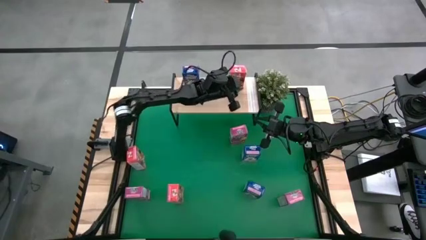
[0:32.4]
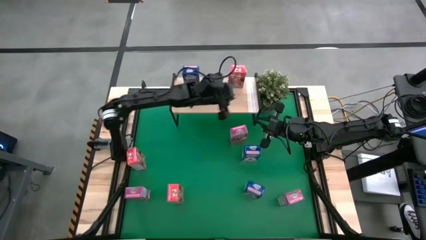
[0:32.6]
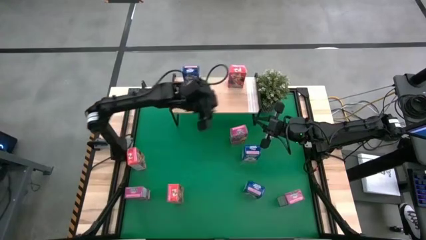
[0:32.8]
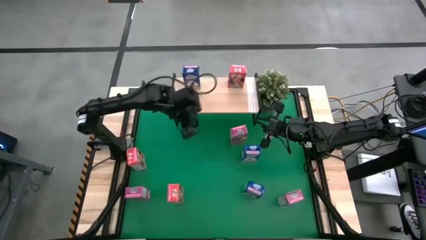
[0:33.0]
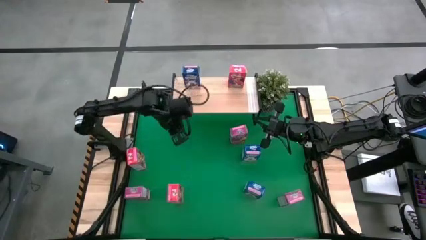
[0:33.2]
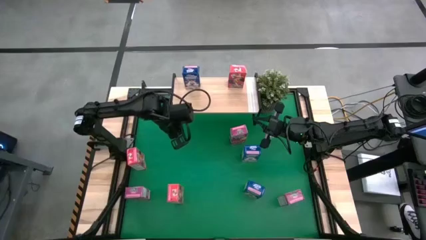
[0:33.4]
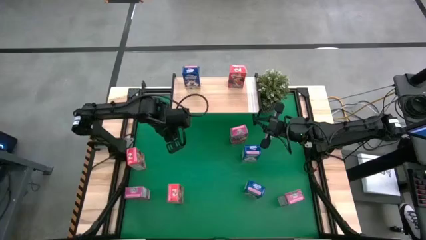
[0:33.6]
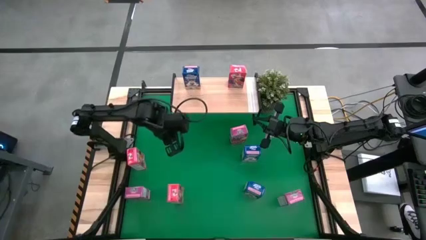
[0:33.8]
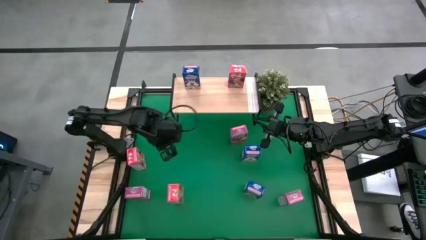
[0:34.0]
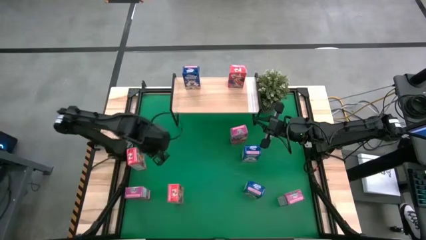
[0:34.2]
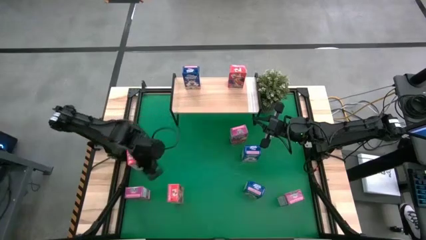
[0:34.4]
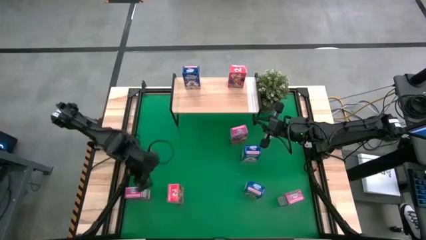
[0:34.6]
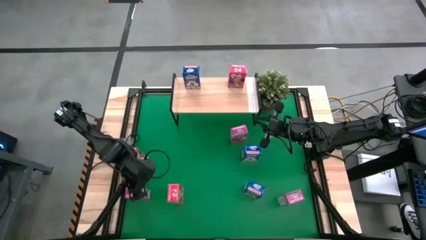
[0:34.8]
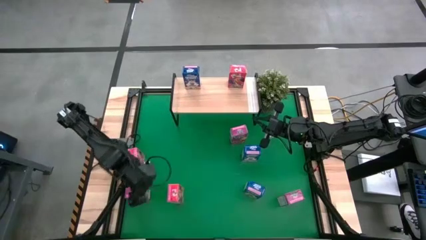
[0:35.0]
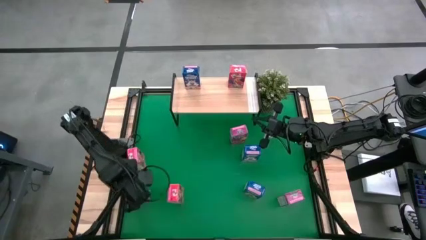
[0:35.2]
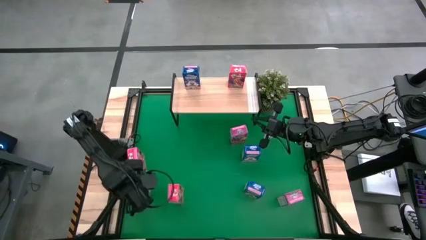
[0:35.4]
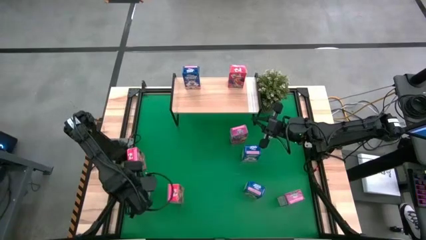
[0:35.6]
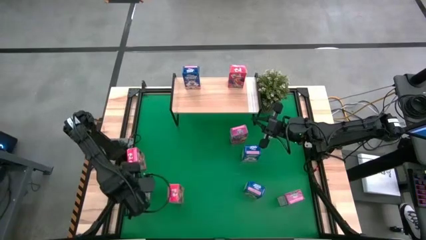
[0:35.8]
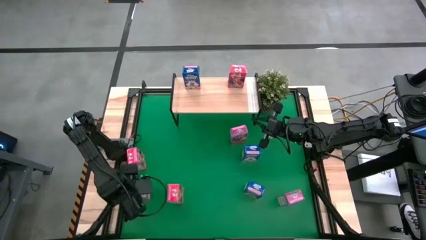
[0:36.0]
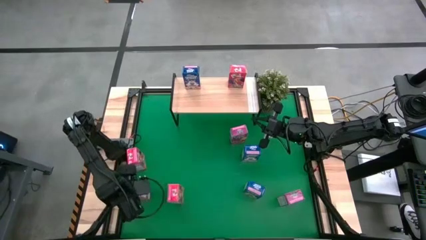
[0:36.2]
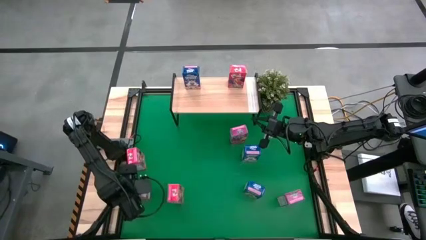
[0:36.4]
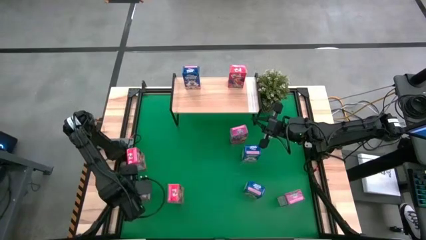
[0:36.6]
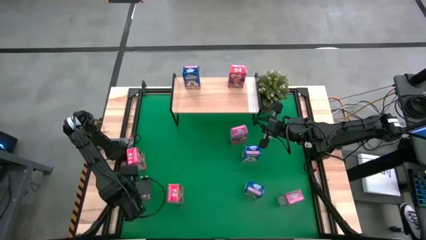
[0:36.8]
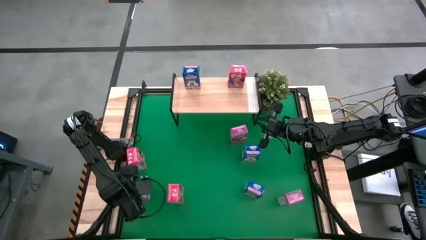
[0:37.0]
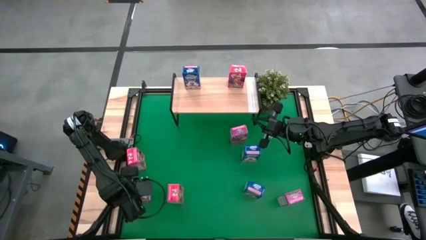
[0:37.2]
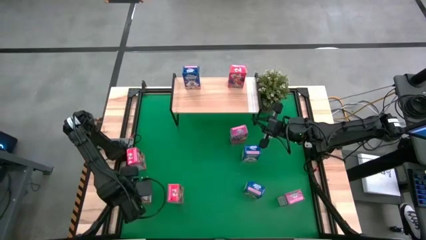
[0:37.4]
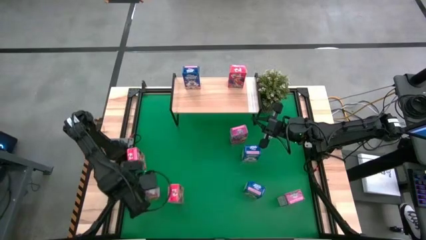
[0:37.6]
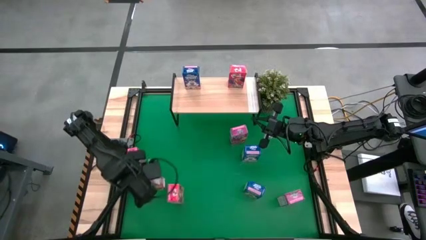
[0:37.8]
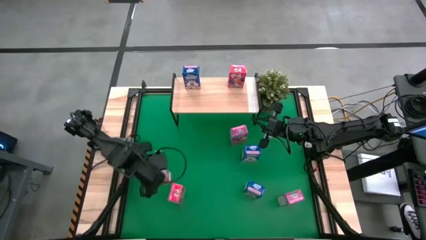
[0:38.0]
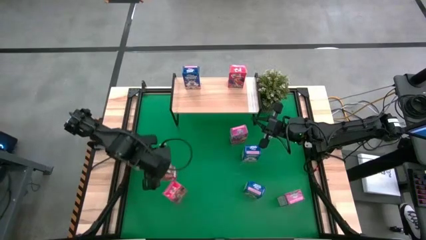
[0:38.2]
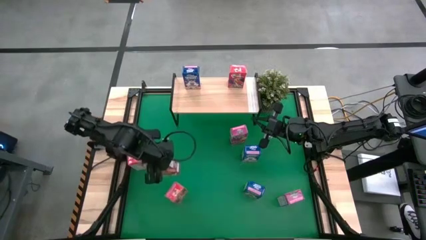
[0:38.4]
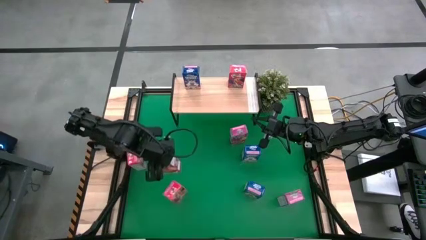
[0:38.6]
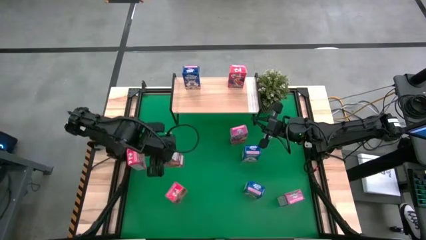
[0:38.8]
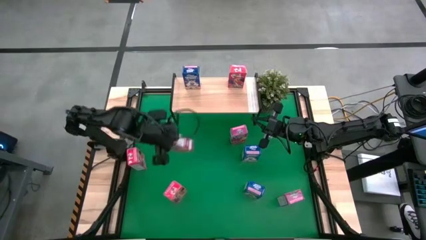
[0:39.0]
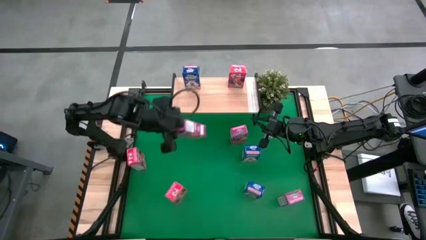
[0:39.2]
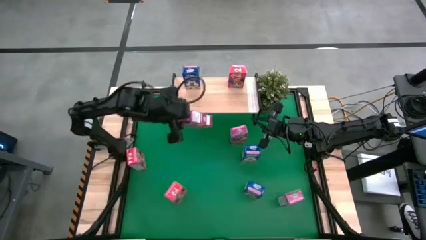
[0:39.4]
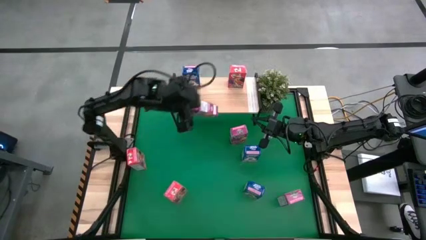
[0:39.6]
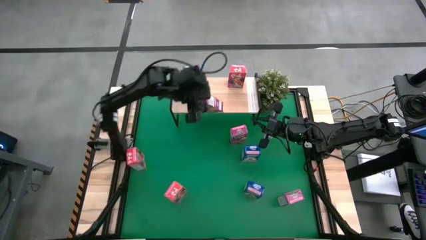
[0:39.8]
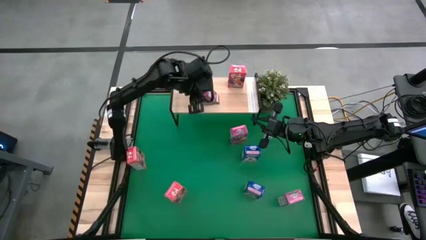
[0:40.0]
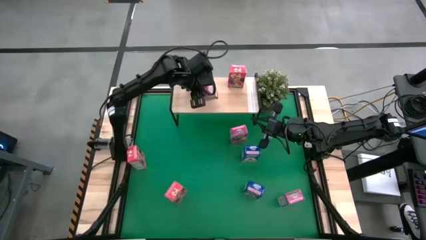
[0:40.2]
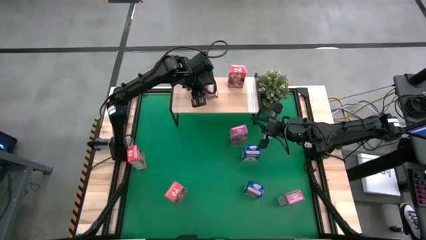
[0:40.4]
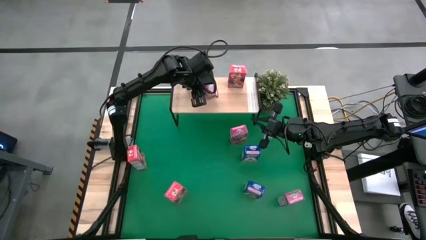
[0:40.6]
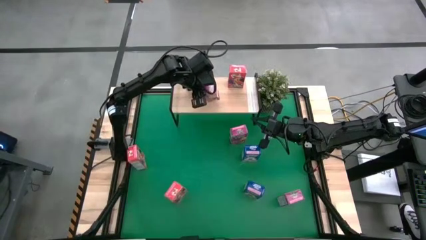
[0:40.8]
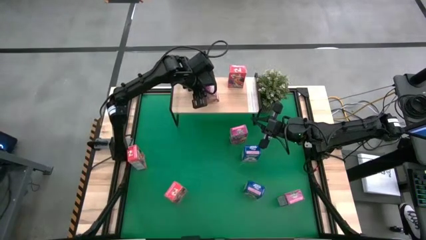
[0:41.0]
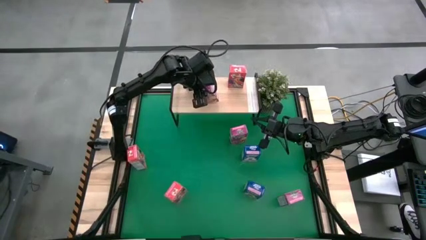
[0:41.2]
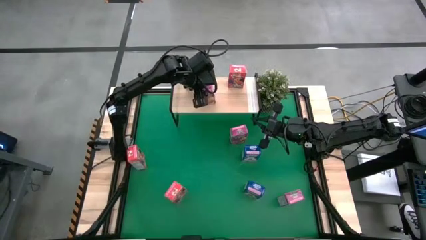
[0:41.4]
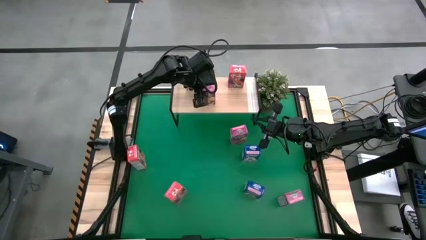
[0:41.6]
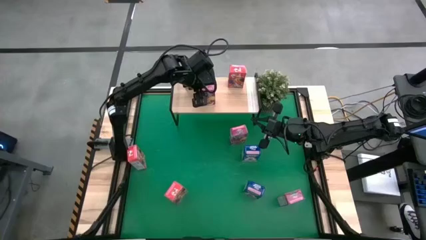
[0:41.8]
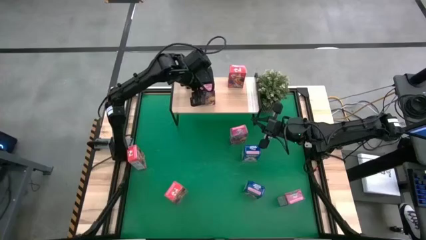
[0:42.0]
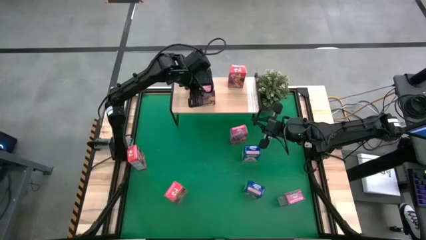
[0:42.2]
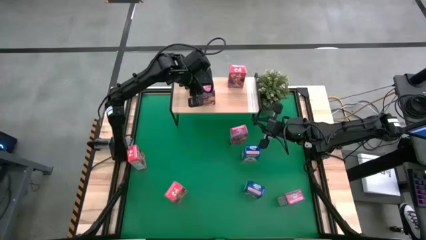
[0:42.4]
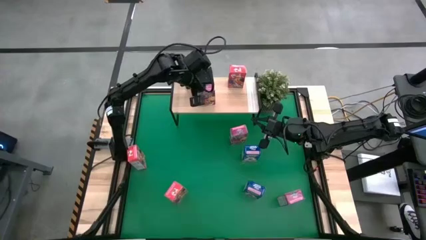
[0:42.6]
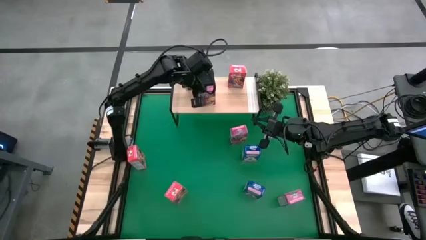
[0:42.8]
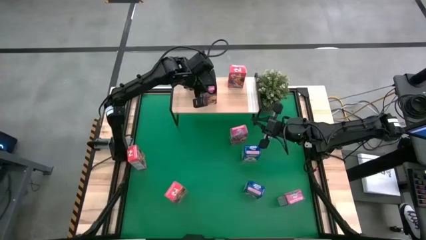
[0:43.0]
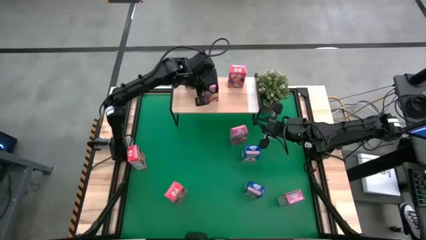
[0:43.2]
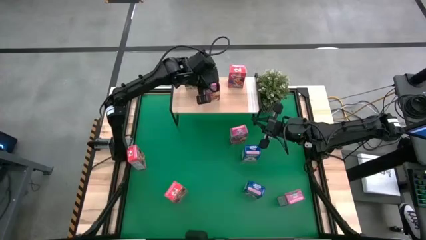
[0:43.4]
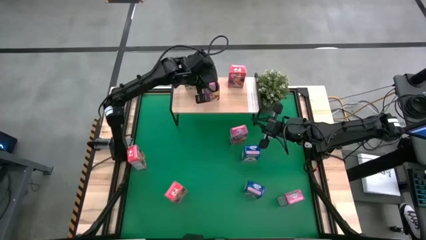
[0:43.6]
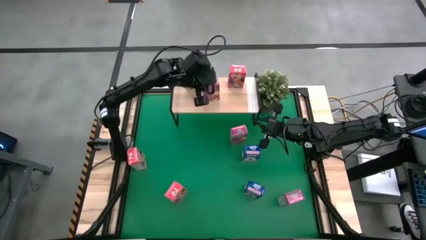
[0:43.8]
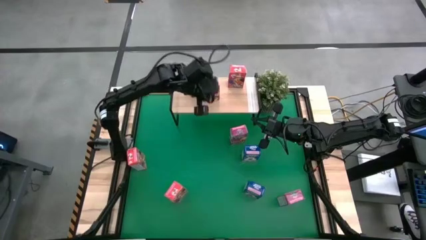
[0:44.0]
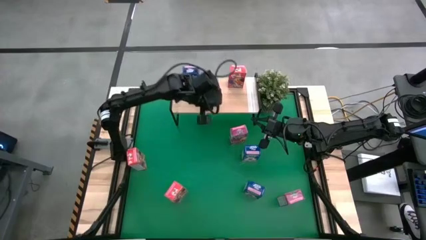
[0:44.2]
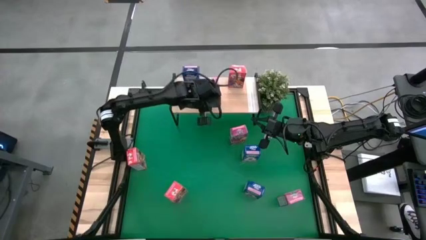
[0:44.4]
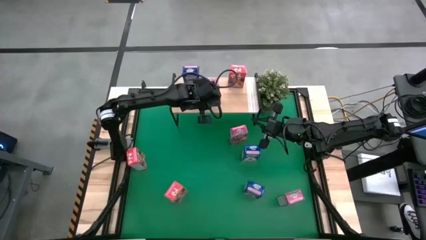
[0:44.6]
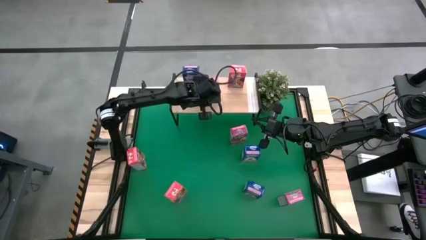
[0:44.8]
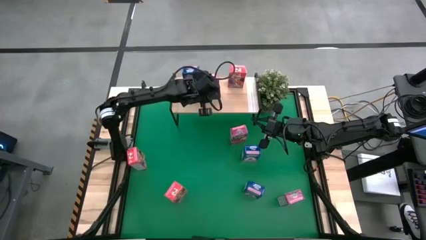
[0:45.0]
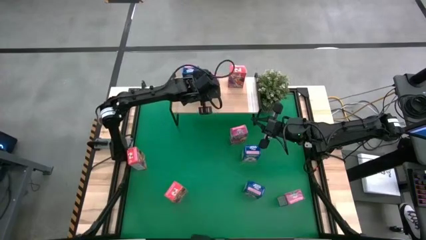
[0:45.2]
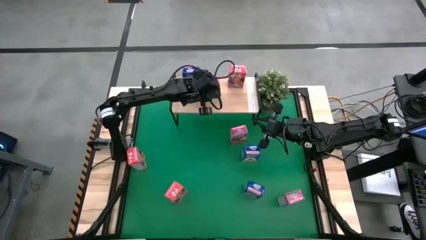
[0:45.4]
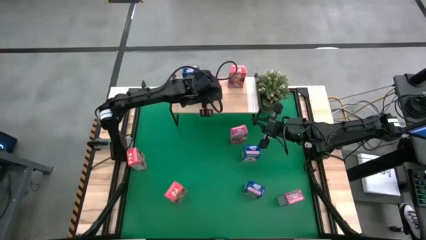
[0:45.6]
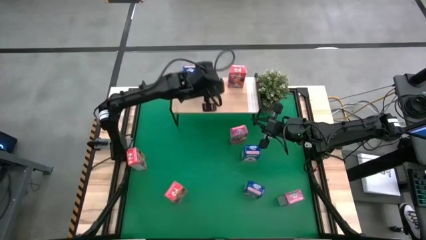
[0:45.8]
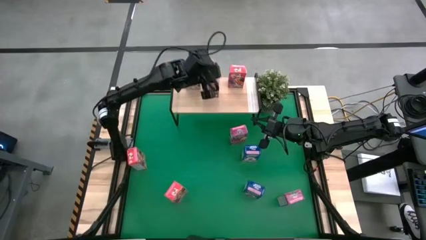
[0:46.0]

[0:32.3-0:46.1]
Task: Stack cereal on shelf
Put the bottom left violet cereal box on the shelf

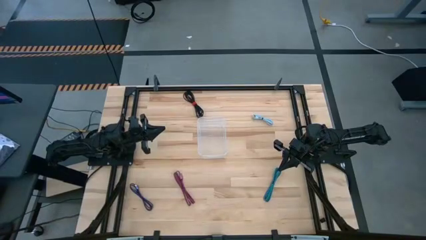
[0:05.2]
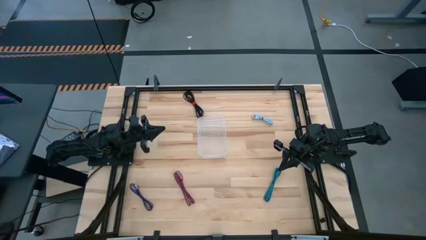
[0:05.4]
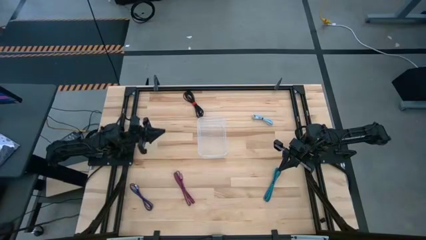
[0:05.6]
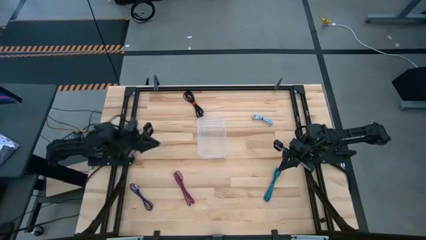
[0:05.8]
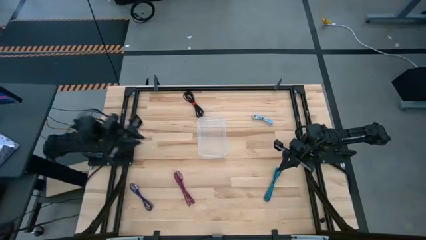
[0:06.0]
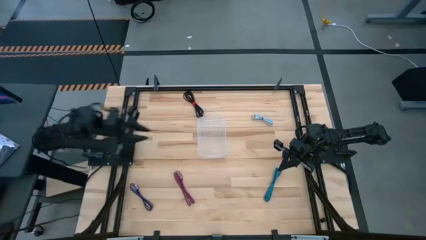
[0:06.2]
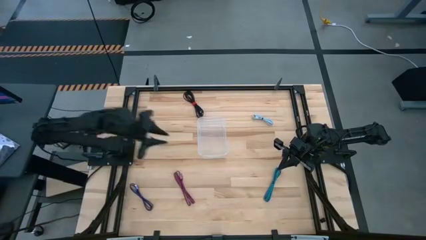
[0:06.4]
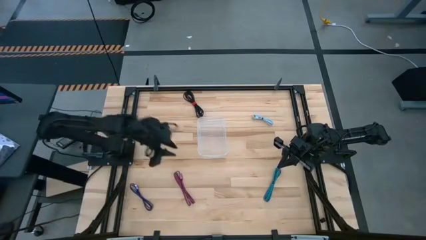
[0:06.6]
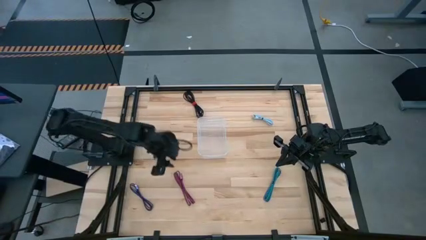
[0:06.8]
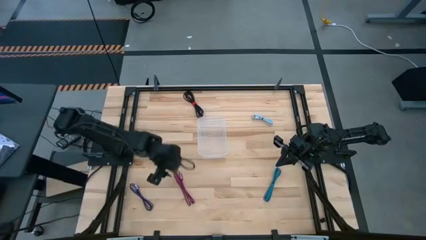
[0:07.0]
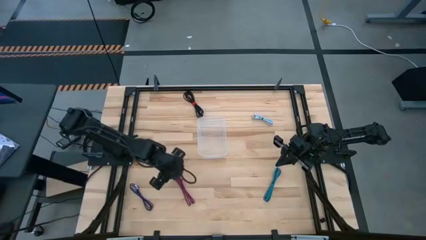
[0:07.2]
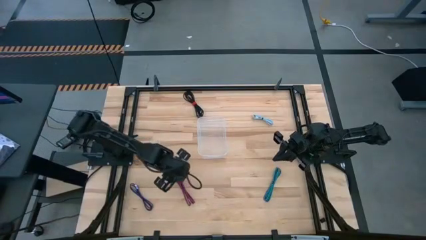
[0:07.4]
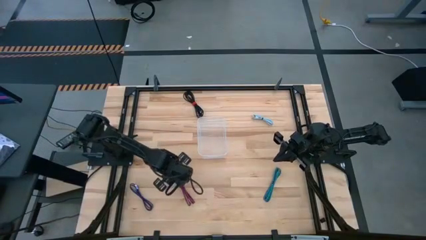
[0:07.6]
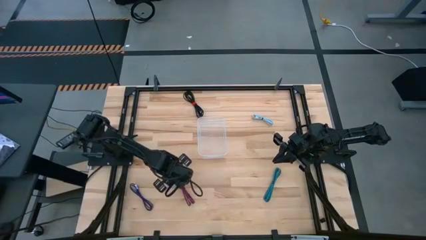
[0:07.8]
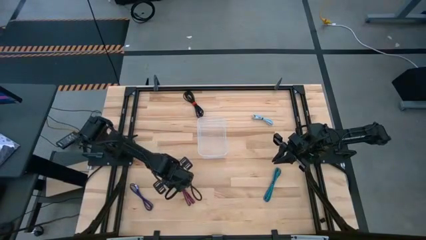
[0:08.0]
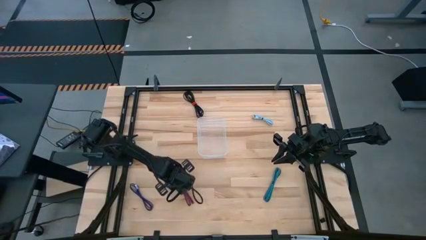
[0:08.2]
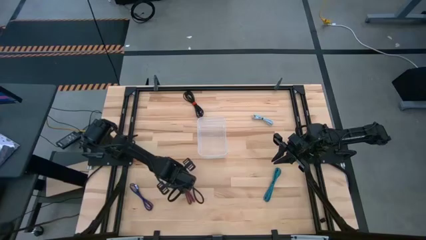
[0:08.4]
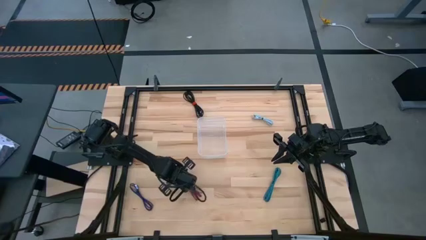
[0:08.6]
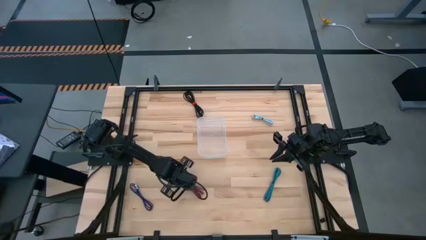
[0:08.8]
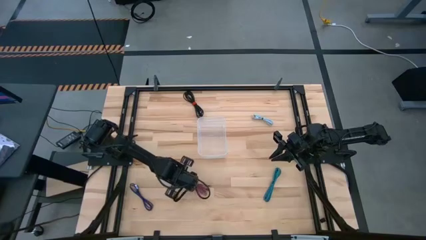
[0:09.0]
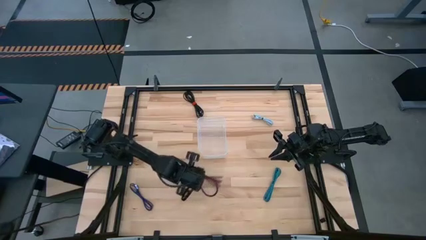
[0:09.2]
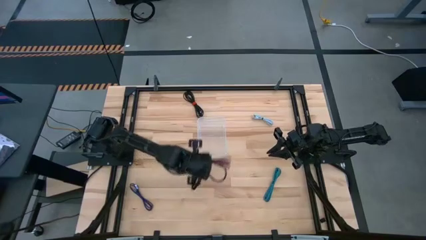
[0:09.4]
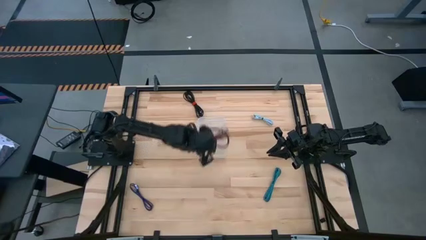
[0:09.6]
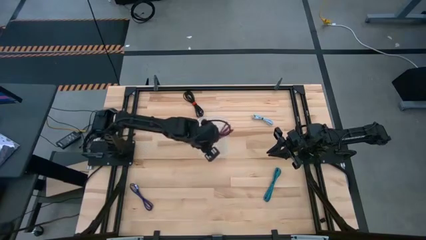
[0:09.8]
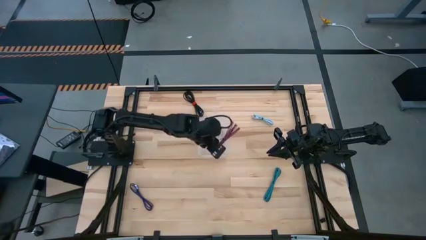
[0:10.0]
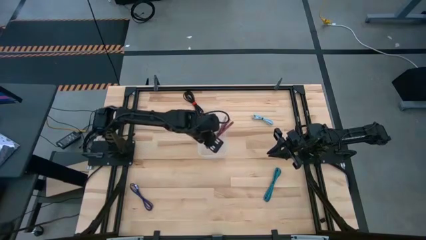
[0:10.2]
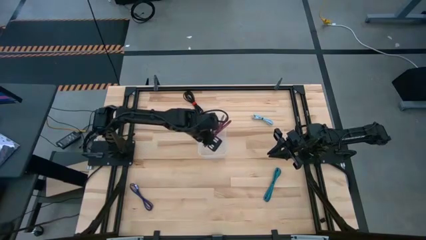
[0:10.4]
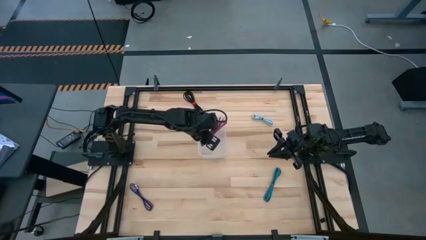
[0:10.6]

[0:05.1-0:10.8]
Task: Pick and place USB-C Cables
Put the pink charger cable into the white bin
